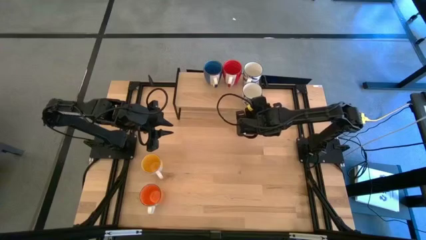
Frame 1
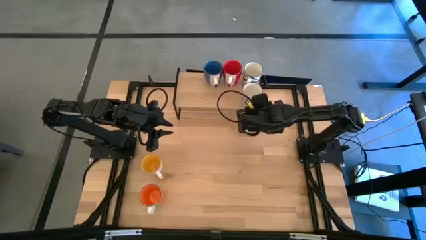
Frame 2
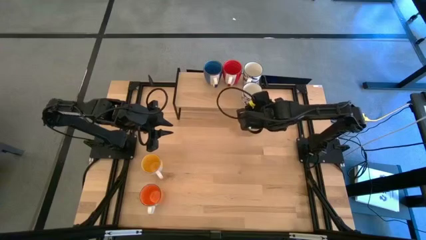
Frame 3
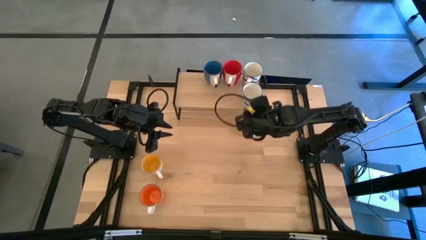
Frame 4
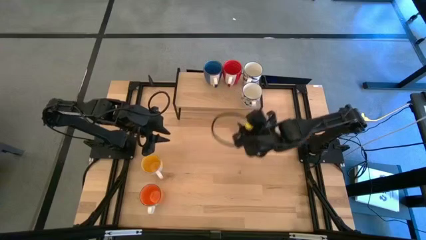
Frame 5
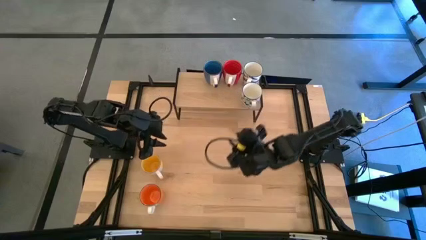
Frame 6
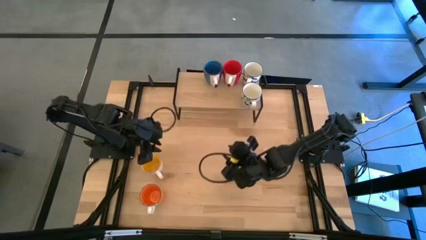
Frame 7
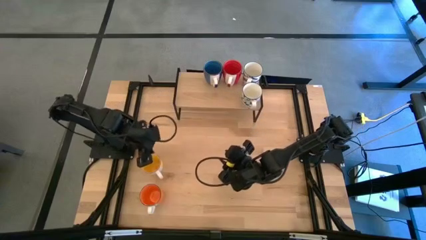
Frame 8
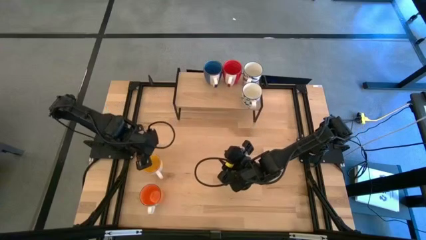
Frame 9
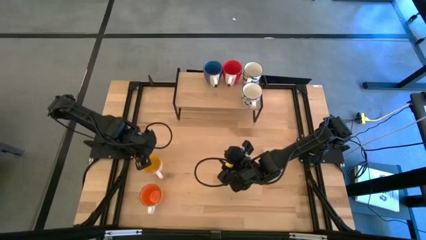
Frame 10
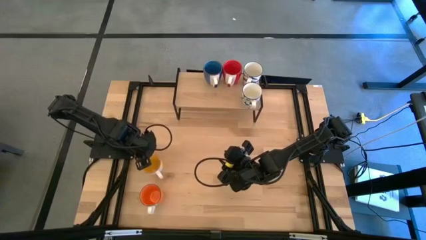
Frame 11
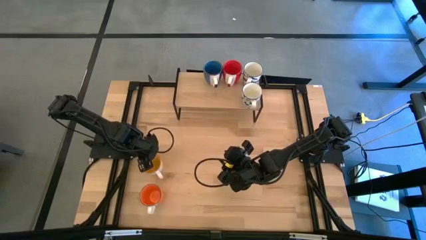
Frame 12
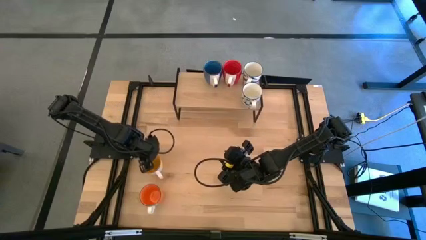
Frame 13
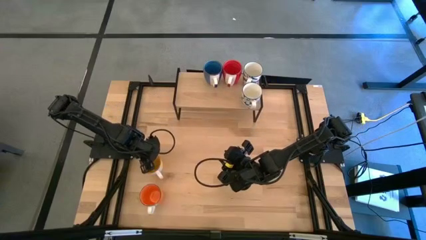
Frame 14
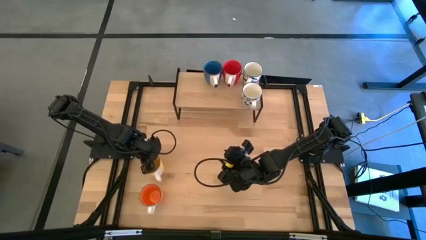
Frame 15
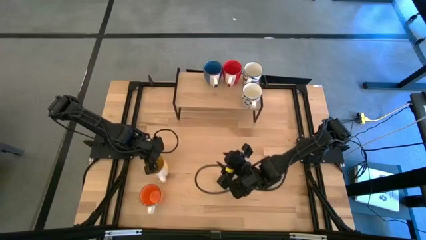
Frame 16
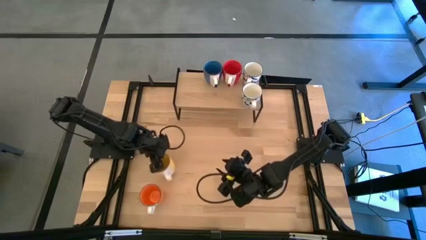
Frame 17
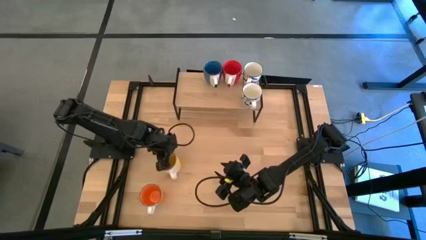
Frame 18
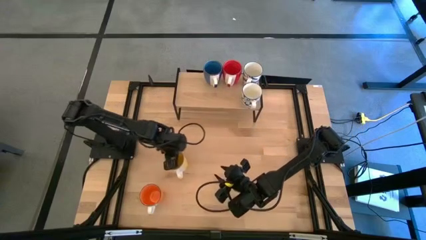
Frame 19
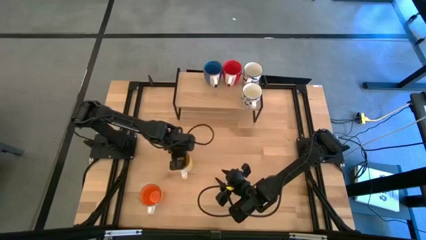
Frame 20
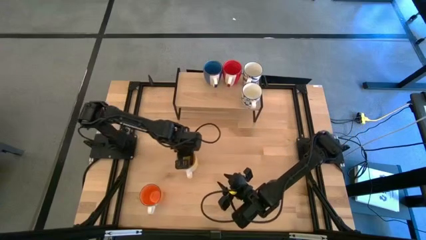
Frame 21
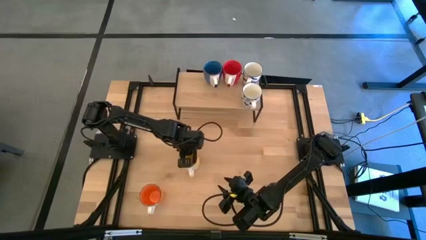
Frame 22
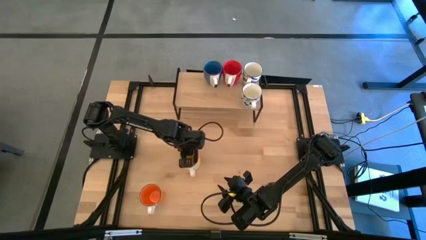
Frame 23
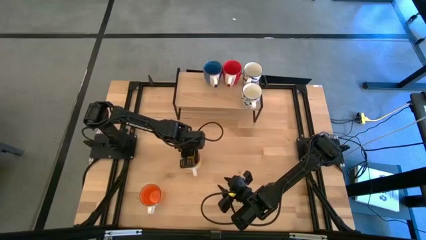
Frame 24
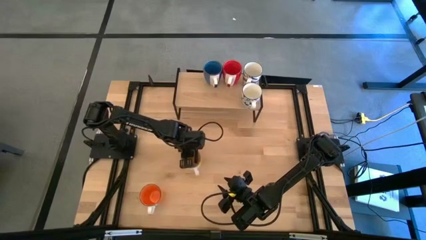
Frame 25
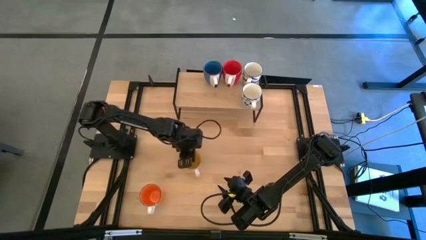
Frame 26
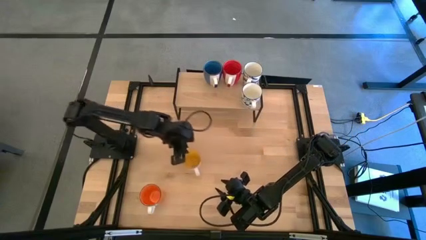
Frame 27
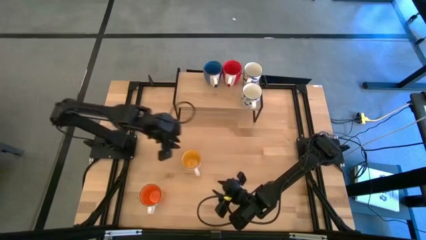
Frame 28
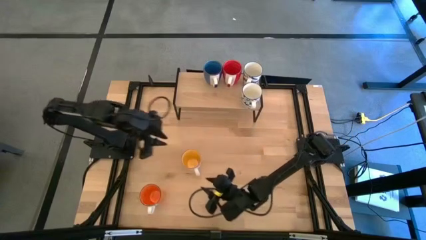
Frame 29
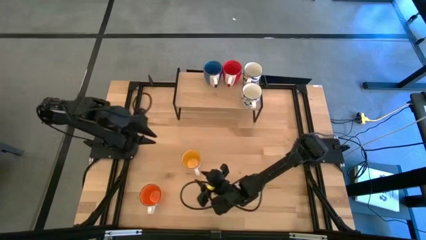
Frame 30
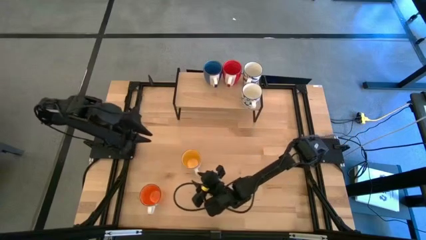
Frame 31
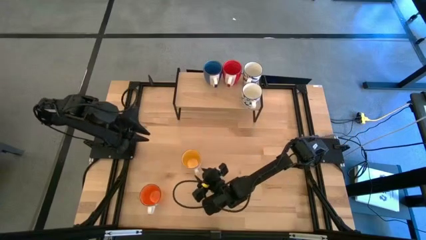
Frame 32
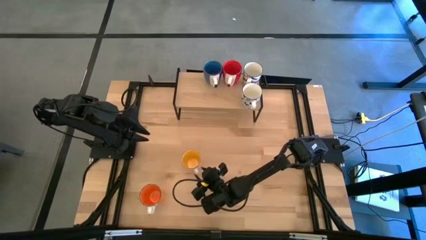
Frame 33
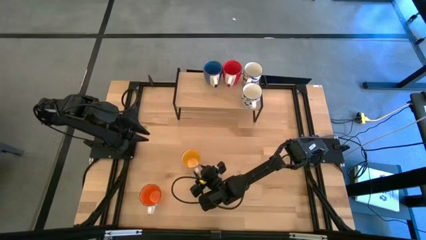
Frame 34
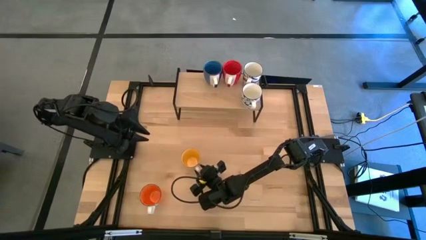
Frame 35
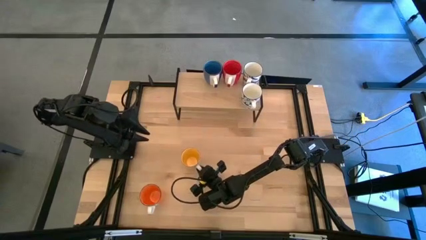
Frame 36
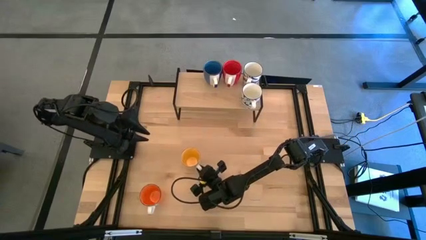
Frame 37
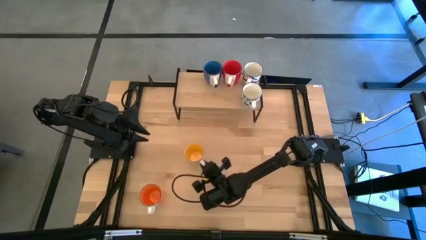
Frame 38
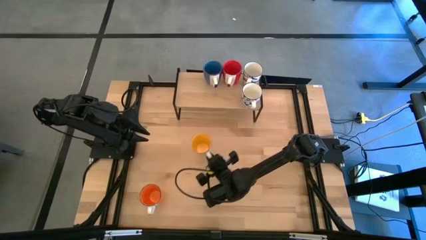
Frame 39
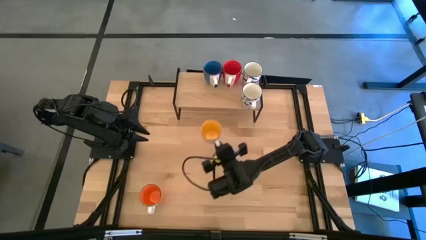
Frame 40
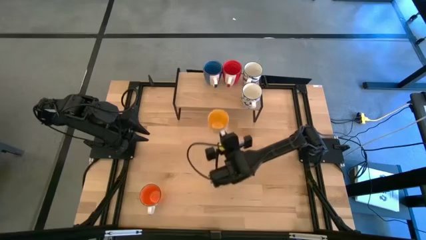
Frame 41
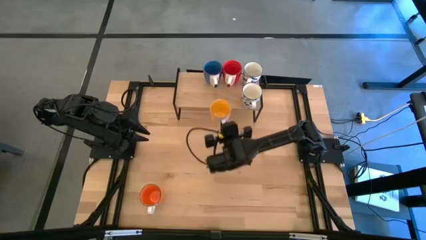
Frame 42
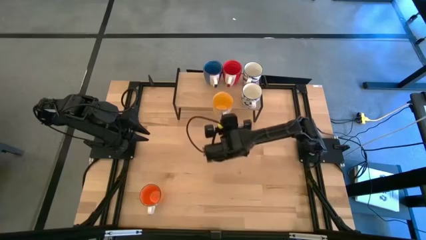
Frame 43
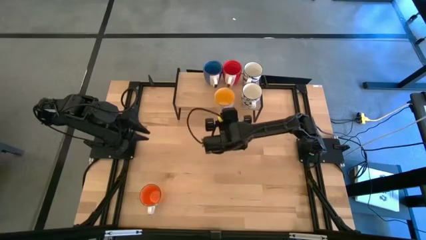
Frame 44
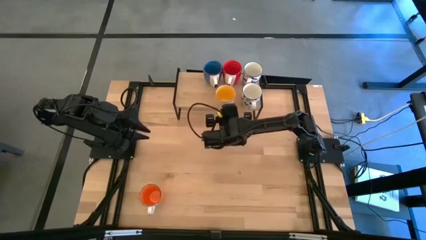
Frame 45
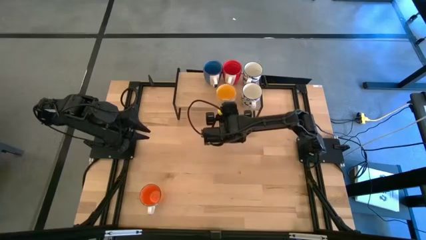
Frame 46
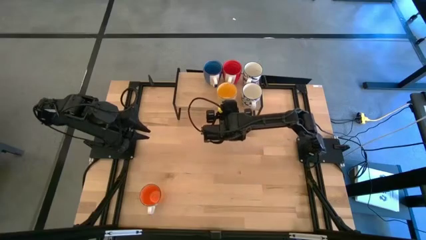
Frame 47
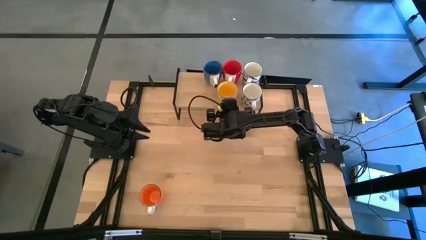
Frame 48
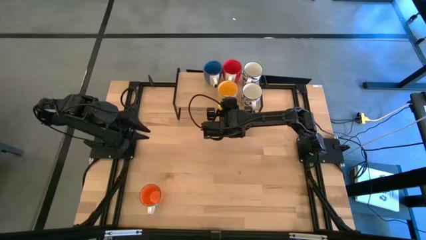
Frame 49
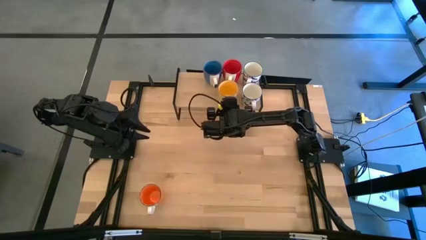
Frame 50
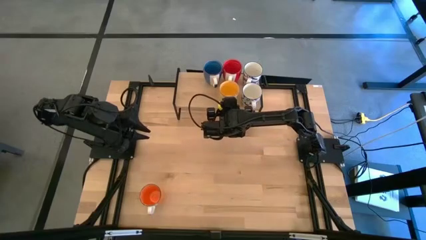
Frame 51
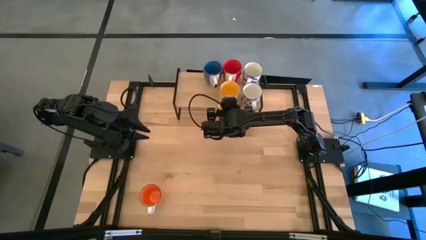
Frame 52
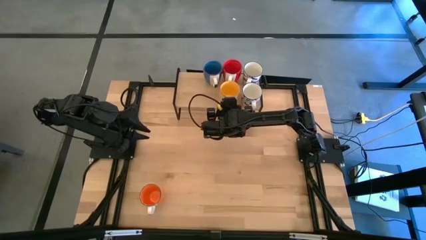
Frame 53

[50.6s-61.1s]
Task: Place coffee mugs
Put the yellow mug on the shelf

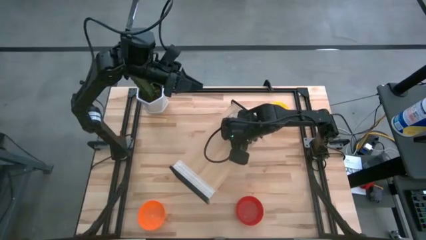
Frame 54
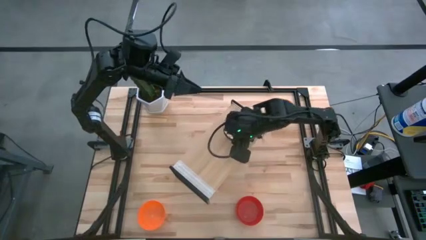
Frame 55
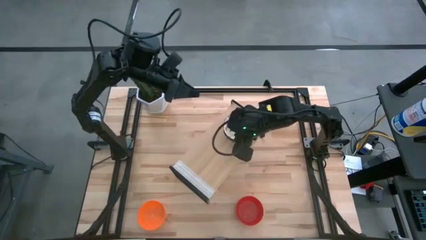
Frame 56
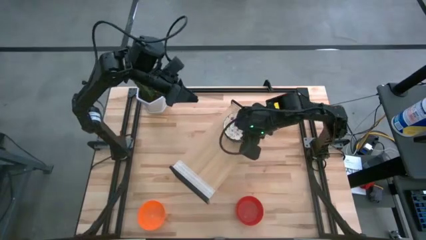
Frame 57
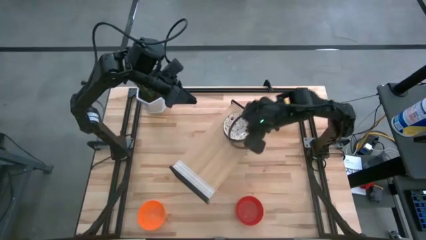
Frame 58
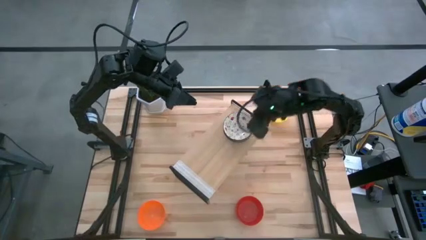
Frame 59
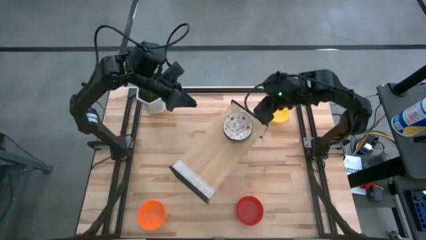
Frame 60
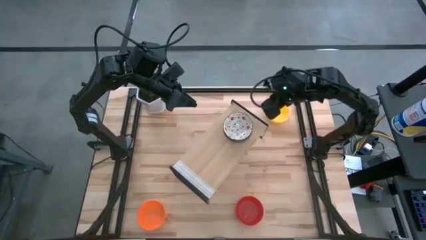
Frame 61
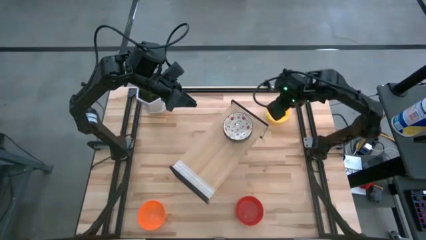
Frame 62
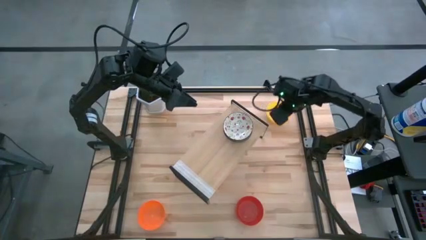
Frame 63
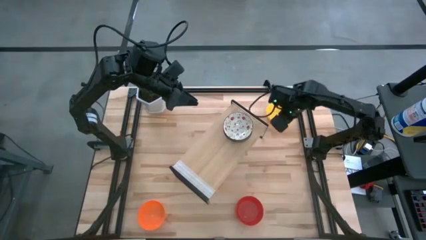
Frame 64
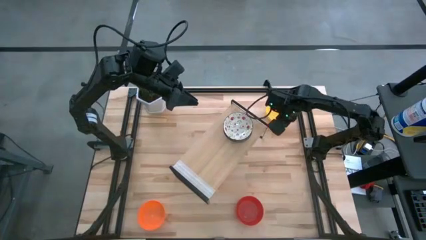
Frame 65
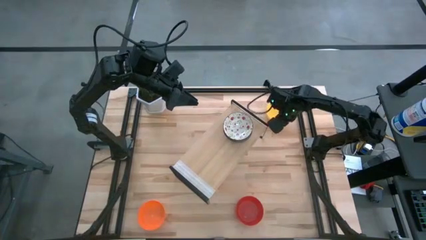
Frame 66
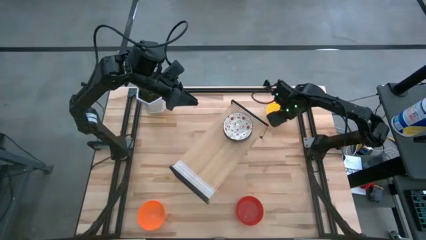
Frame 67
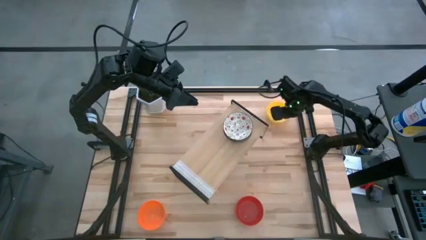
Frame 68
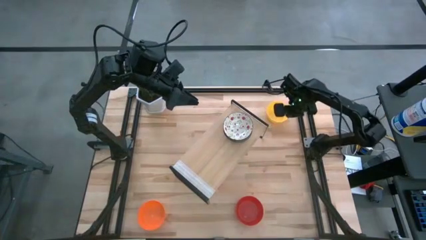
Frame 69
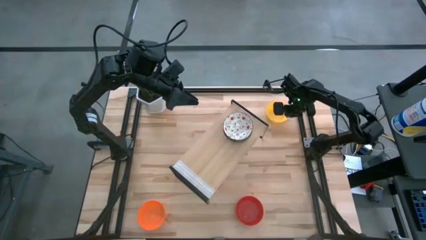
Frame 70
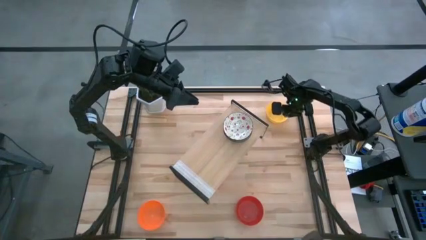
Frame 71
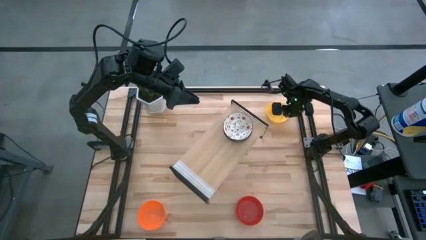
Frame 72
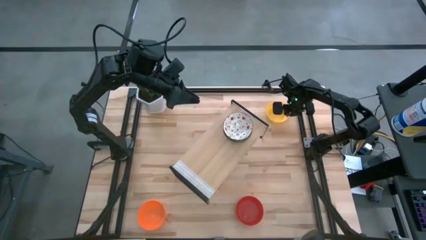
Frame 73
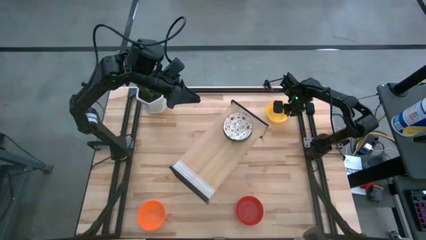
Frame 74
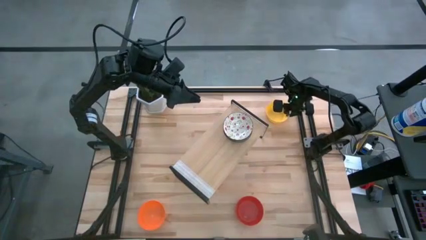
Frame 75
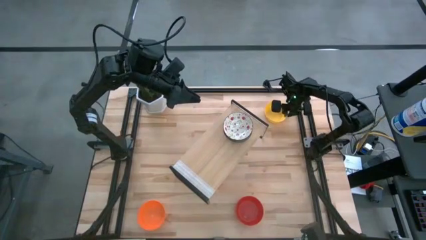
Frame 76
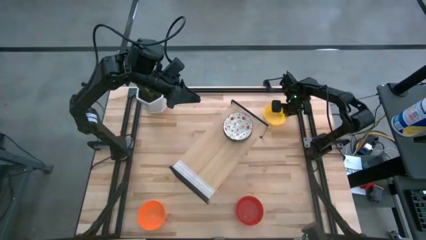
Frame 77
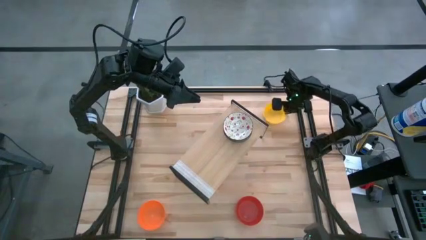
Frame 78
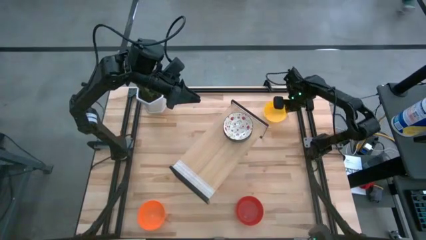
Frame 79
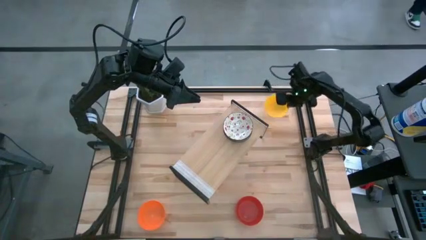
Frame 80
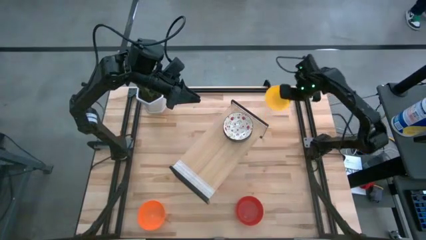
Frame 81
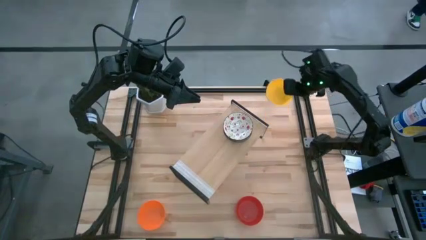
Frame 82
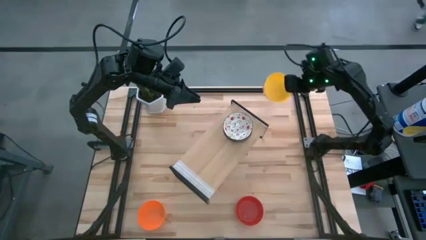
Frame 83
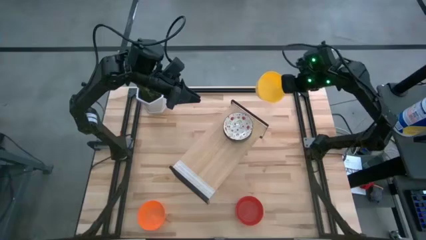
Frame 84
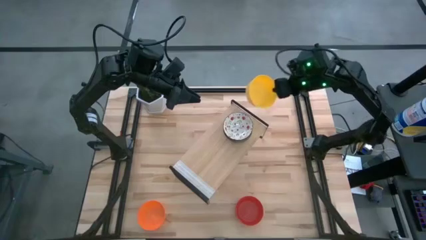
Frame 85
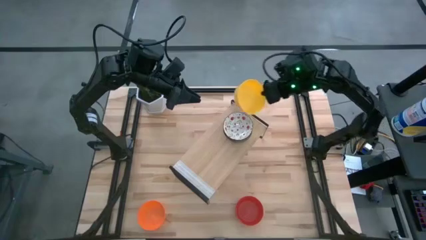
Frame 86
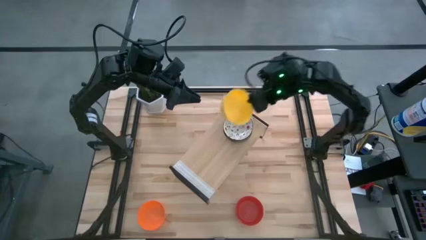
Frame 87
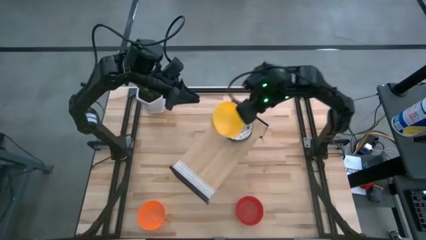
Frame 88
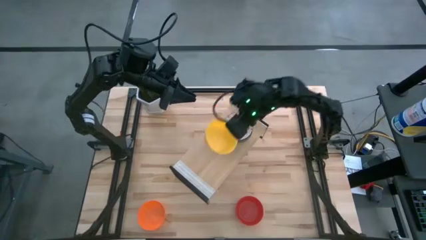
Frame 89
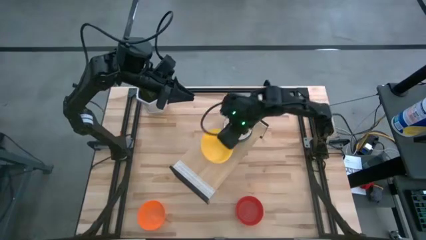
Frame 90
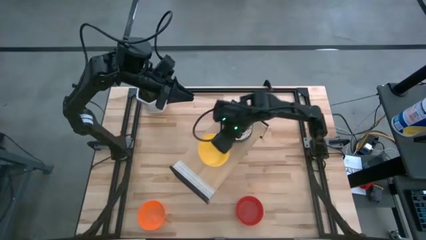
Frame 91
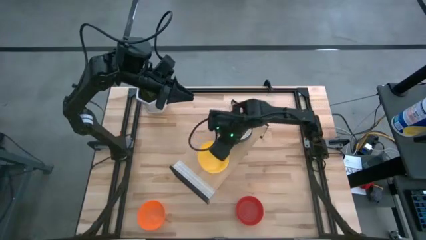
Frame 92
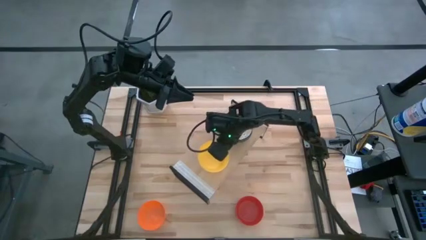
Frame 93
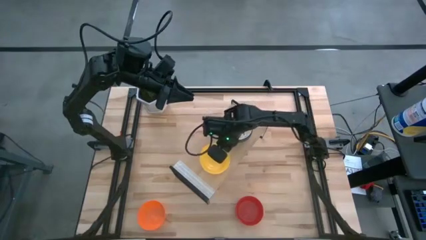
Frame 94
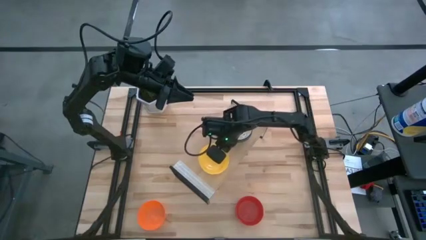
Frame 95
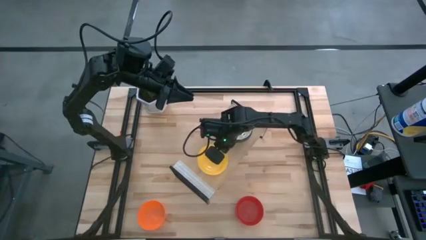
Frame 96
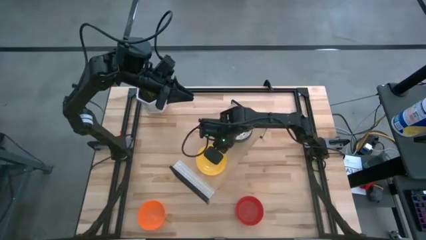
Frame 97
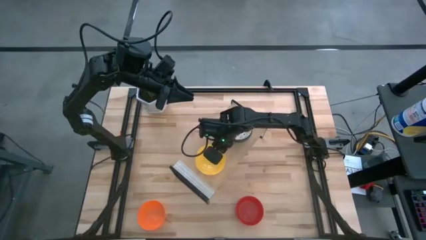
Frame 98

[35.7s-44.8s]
Task: Pick & Place Mini bowls
Put the yellow bowl on the shelf
